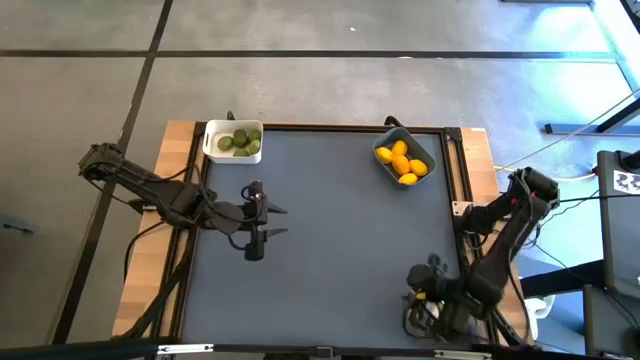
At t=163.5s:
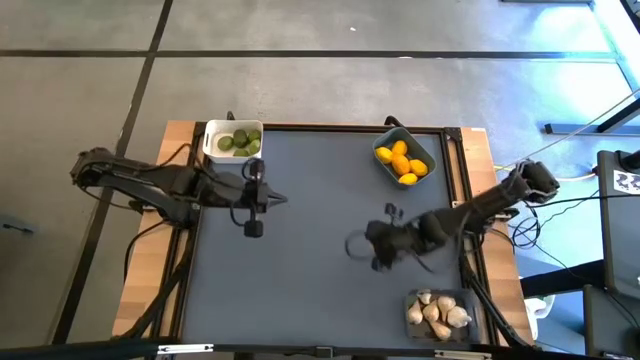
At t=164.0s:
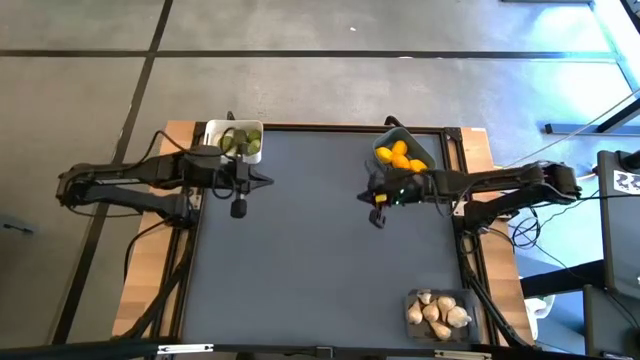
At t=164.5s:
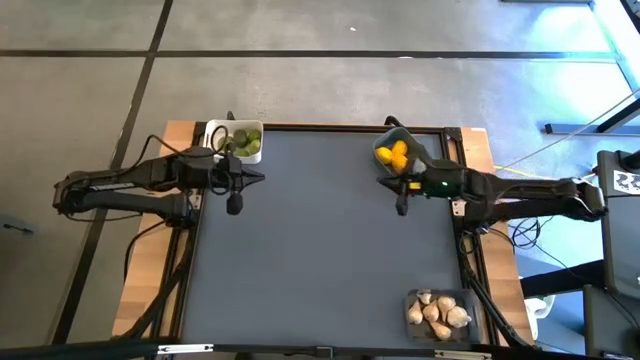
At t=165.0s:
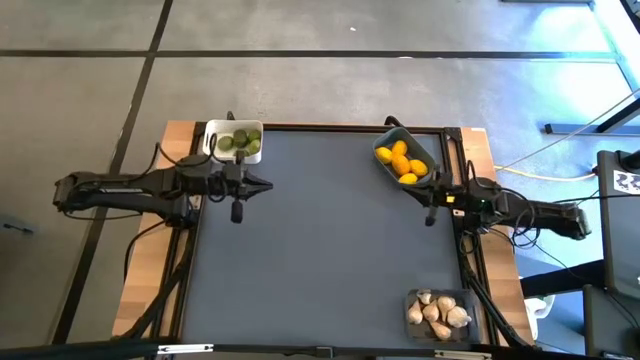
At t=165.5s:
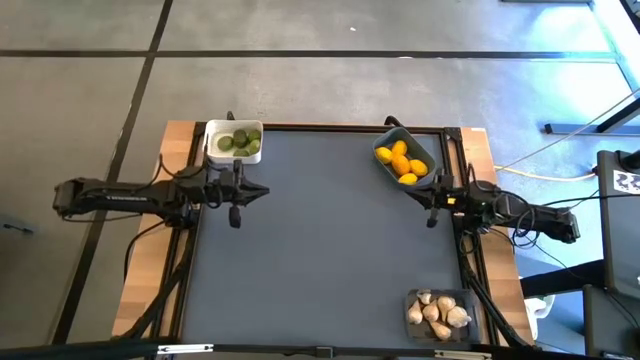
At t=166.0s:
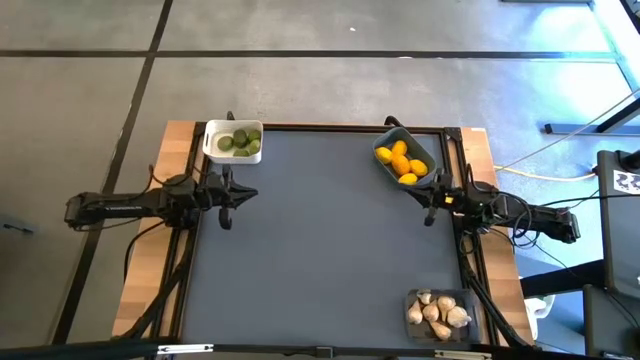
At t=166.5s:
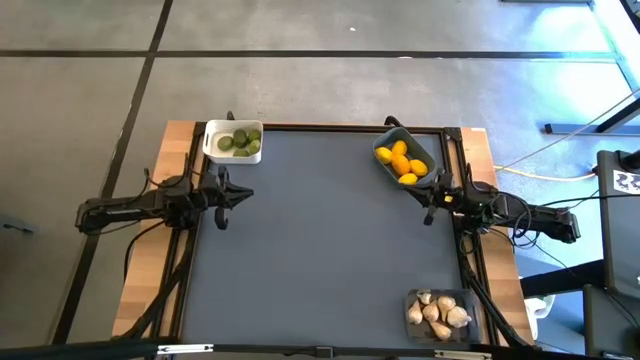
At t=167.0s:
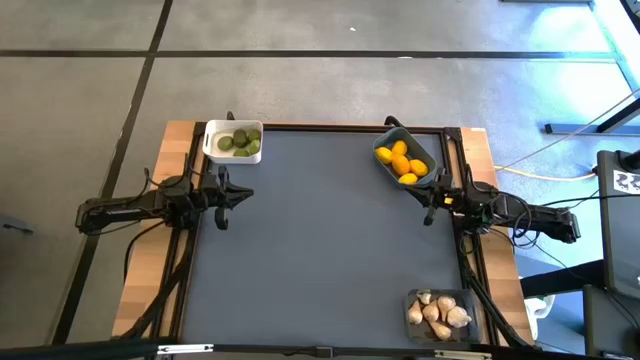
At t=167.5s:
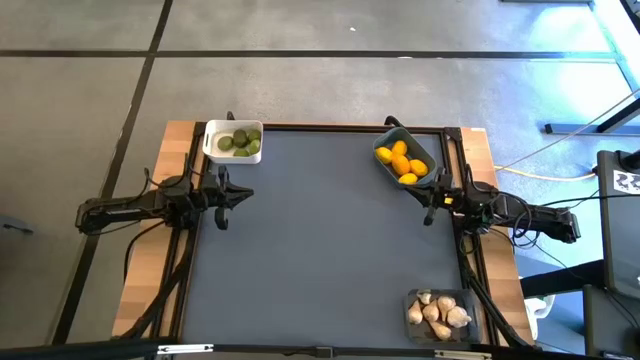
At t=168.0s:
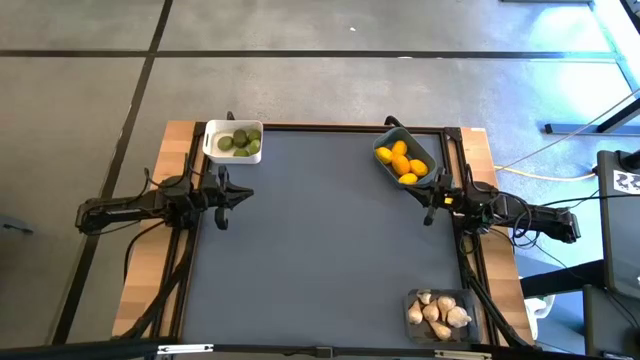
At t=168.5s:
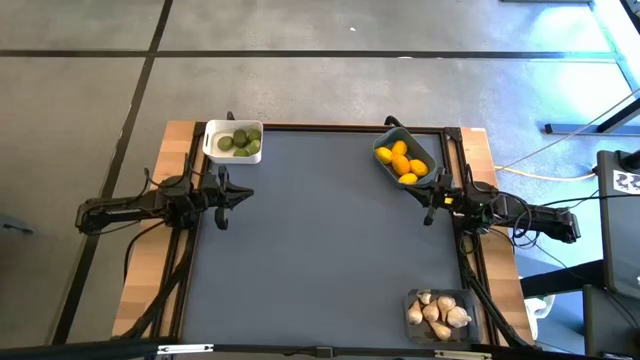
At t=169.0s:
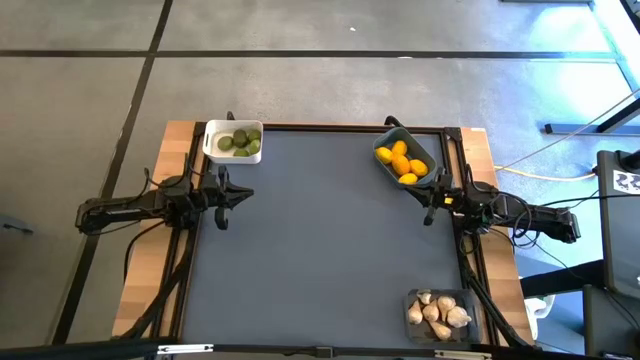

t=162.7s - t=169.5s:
Task: Sort produce into baskets
Return to Home Position

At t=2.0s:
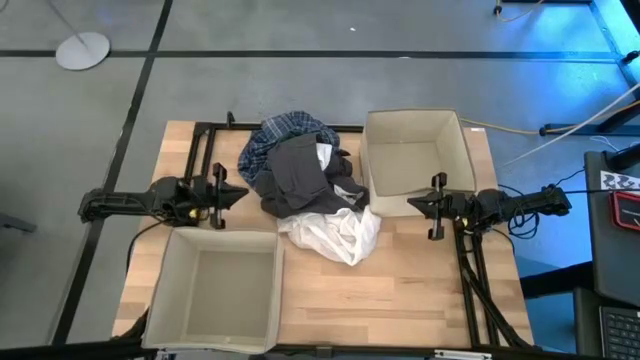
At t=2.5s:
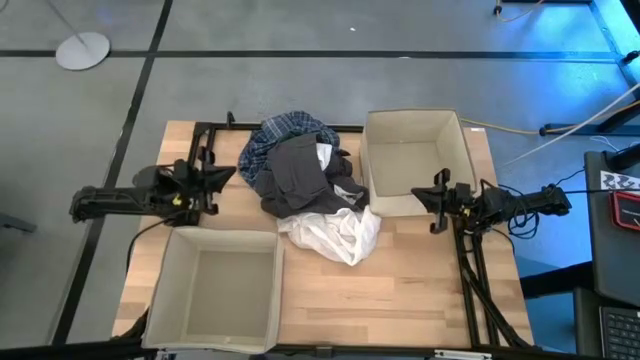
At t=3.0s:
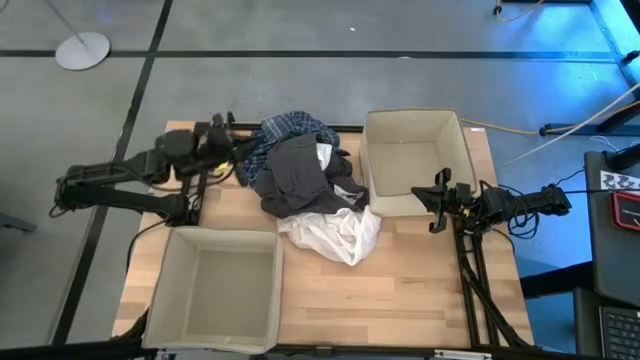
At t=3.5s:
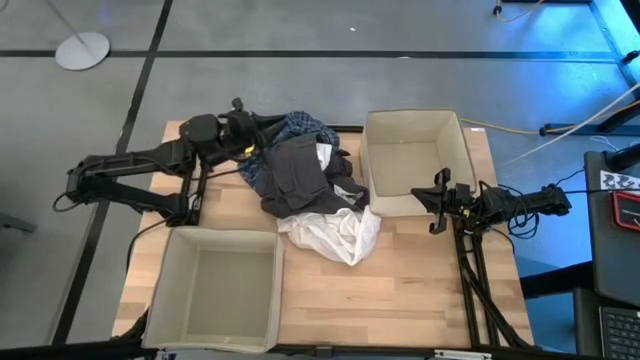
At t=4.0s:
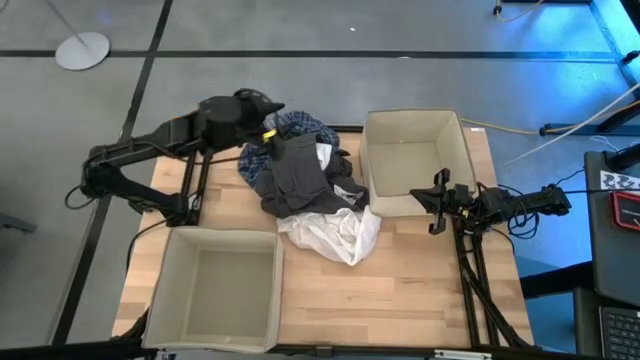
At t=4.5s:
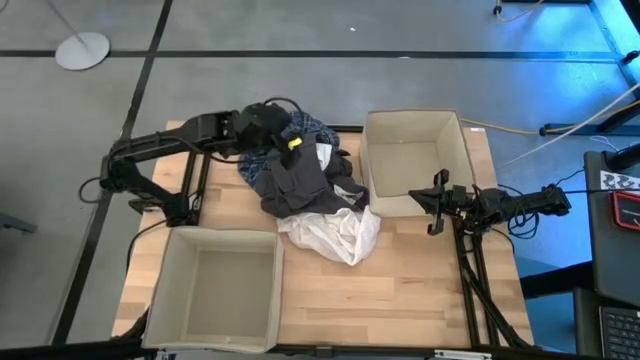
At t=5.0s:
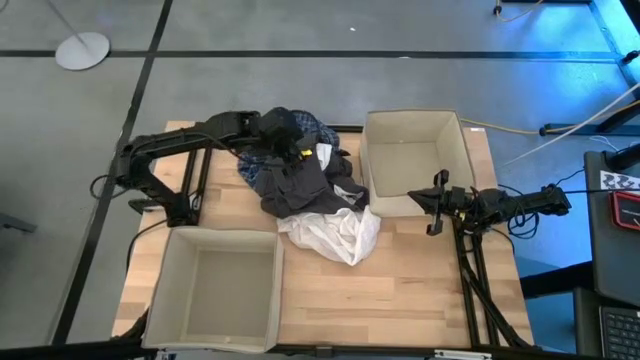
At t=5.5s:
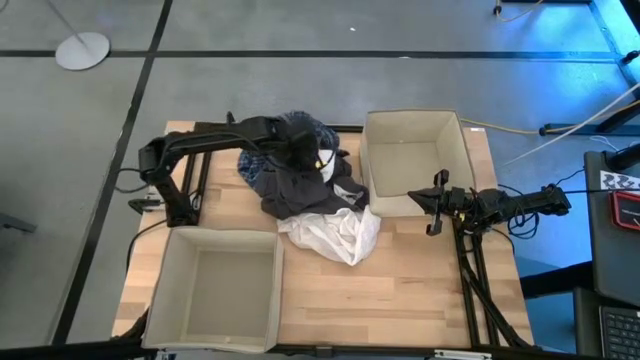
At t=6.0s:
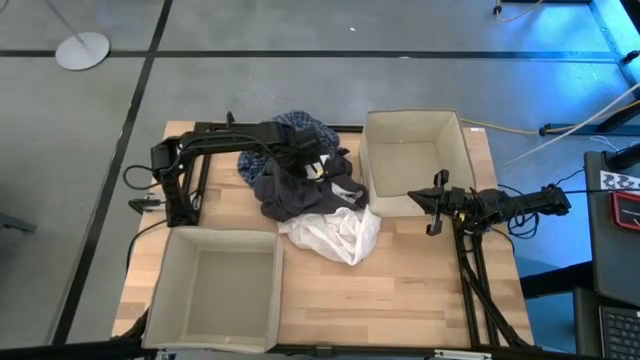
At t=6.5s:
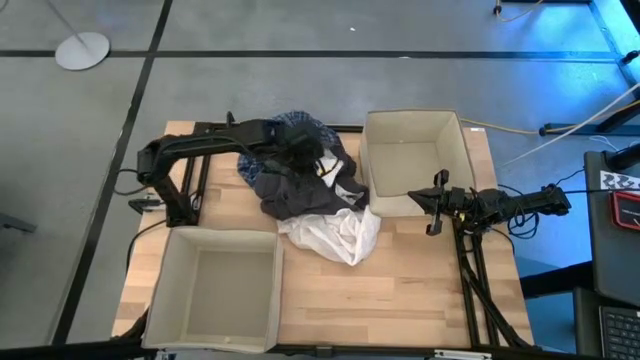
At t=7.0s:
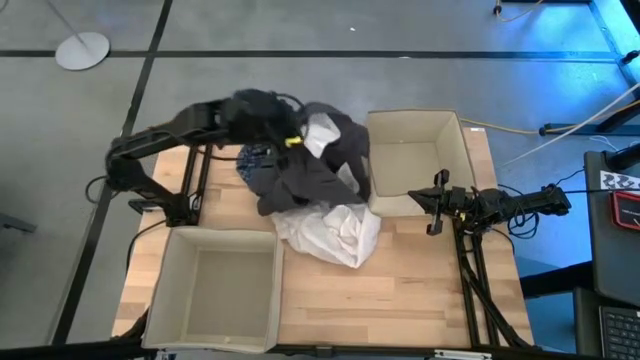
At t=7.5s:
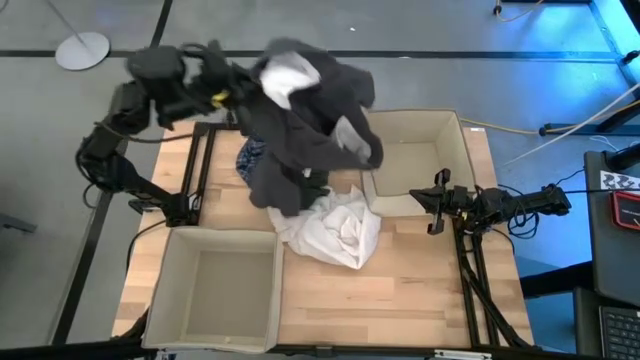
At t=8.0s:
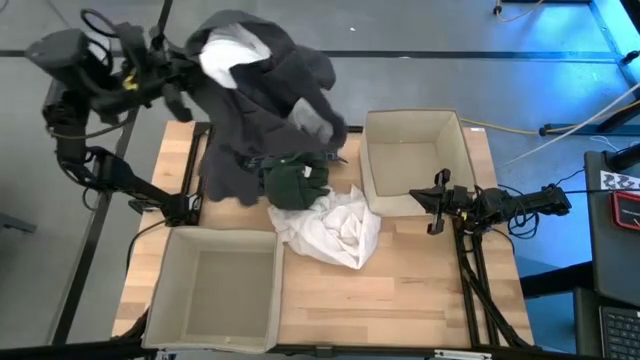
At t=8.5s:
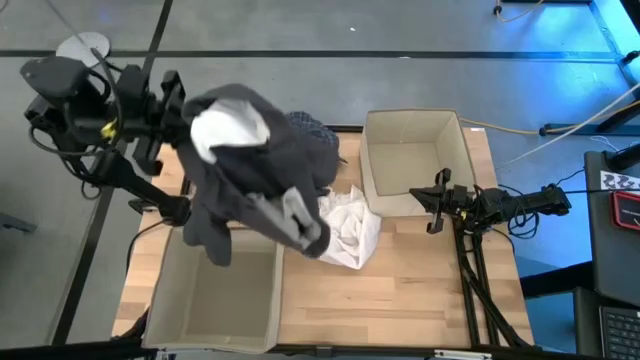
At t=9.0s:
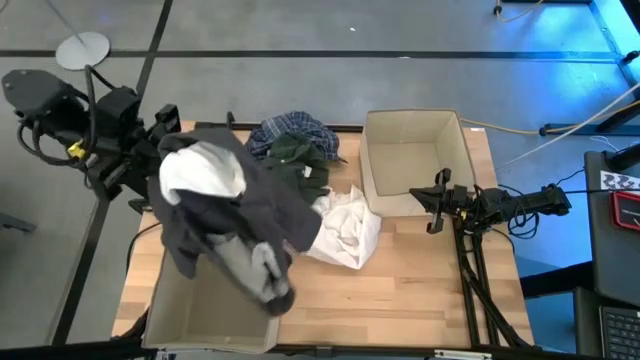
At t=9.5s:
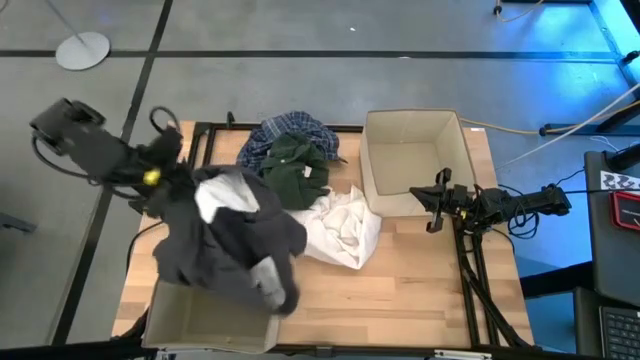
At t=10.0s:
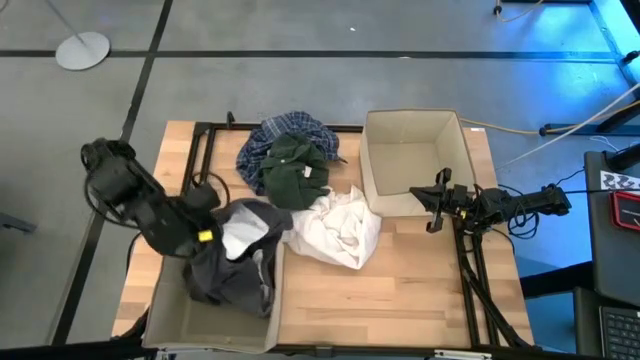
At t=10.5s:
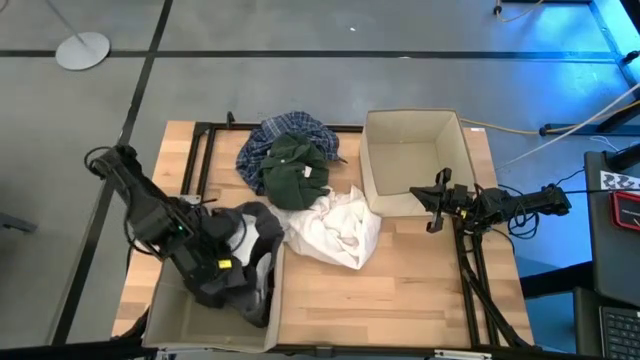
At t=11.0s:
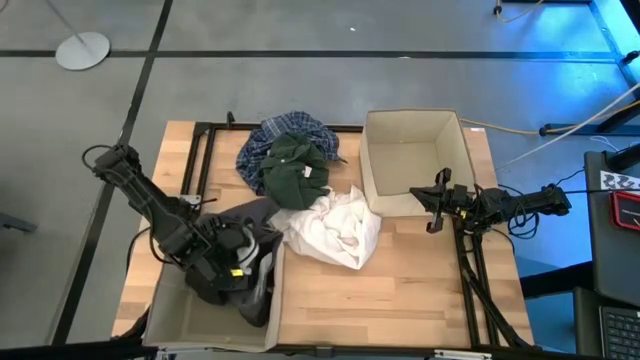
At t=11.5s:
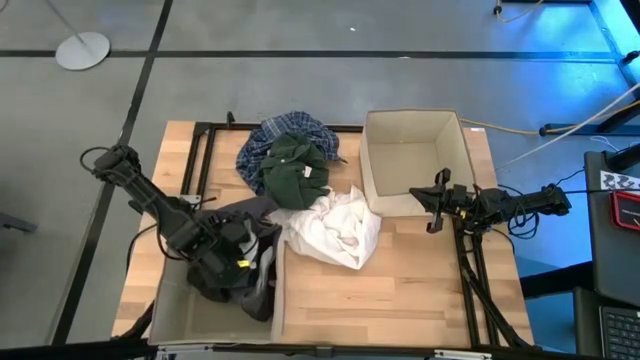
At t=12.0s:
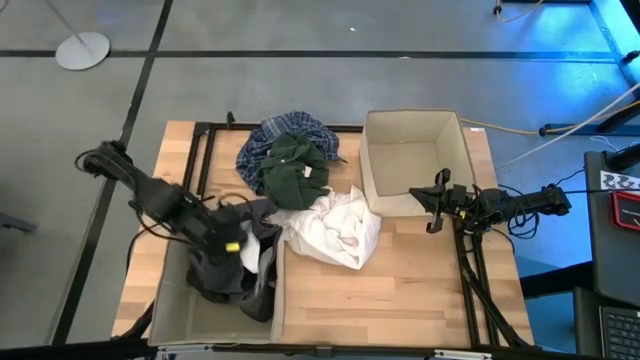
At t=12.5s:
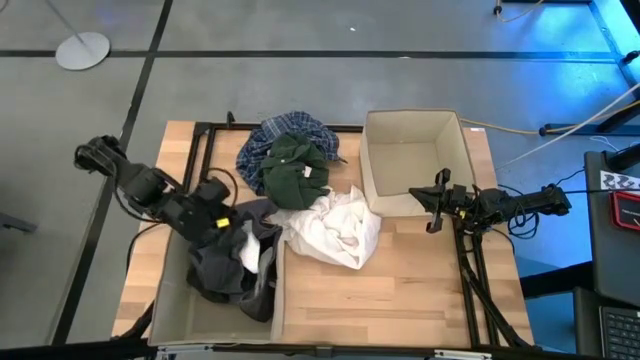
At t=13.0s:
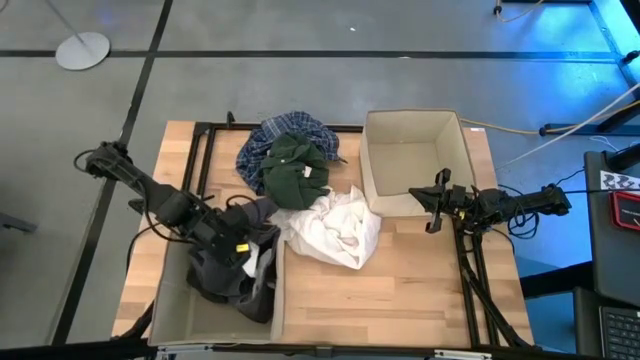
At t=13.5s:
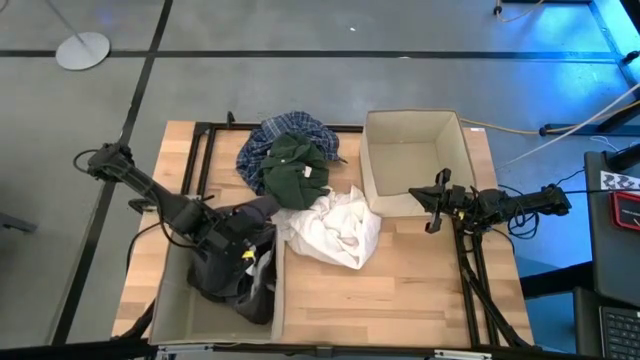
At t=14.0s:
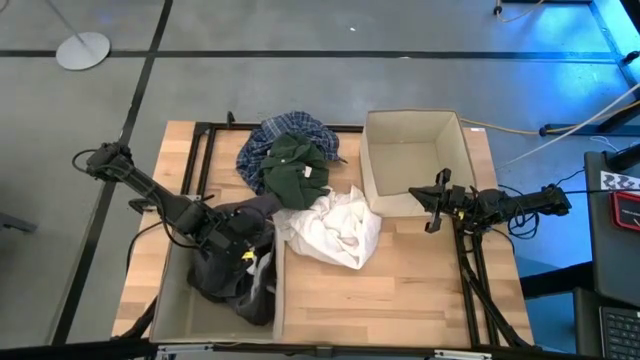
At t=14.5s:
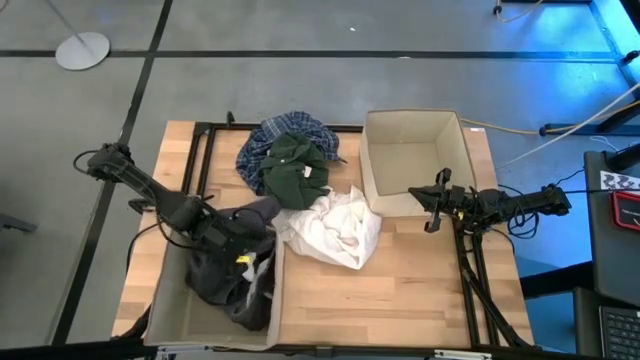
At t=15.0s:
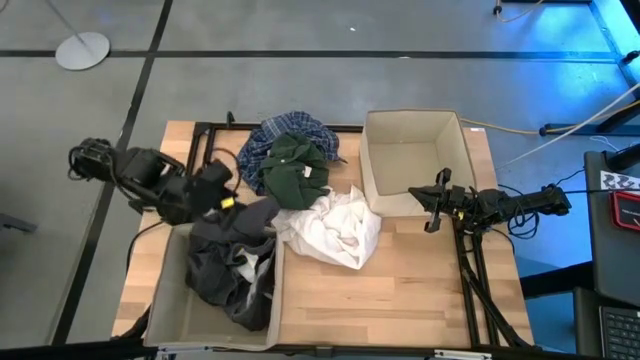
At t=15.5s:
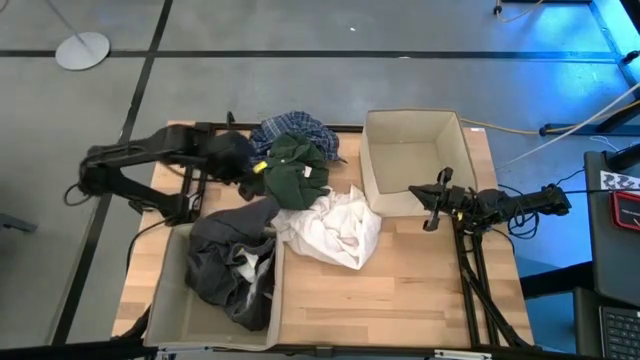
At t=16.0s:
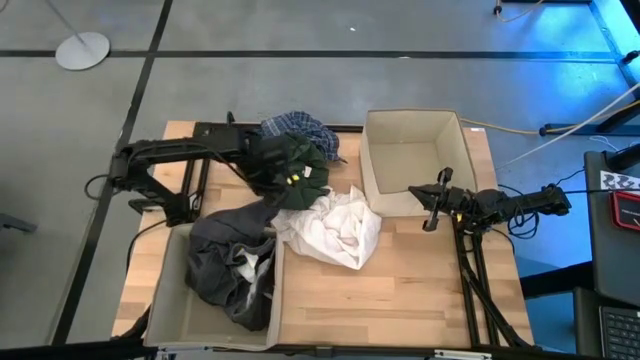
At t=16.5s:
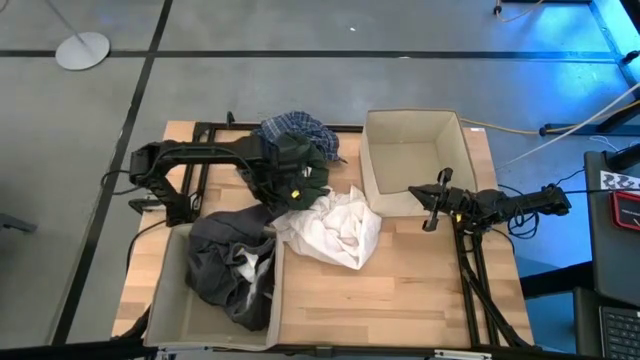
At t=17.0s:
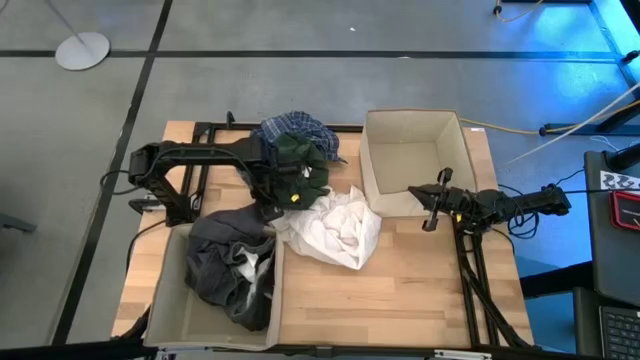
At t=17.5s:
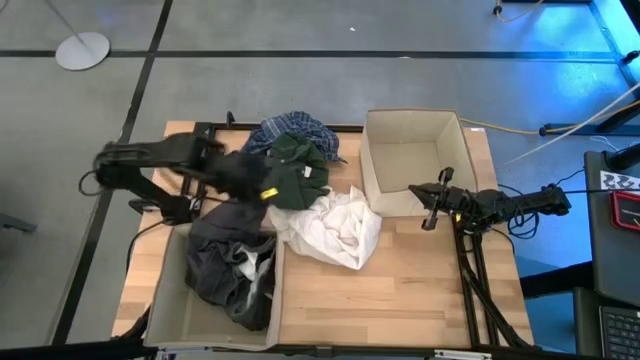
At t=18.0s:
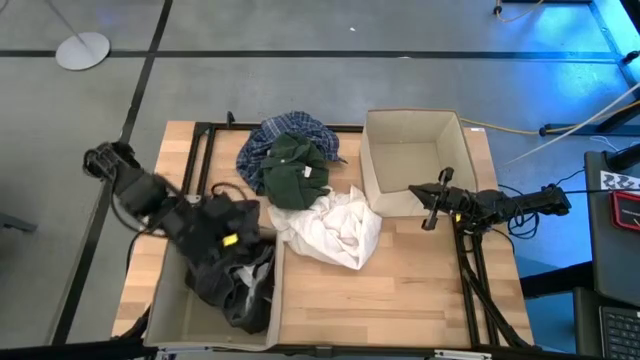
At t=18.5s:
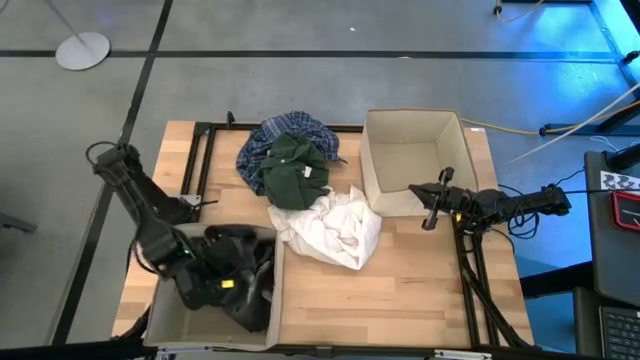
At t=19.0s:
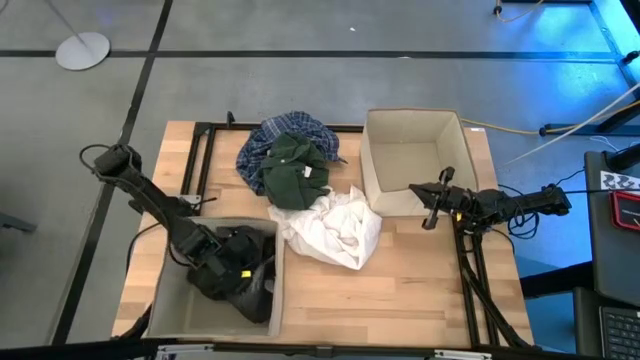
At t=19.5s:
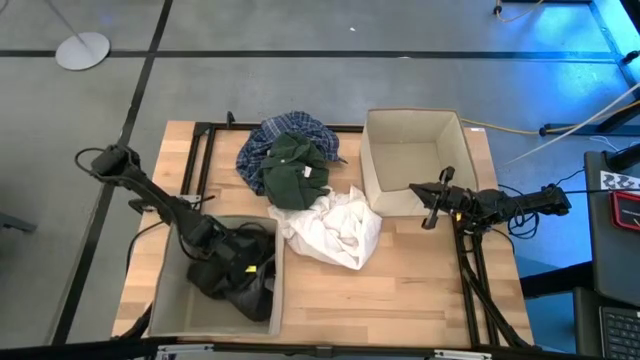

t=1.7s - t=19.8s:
Task: Sort clothes
Put the gray pants into the left brown laundry organizer
